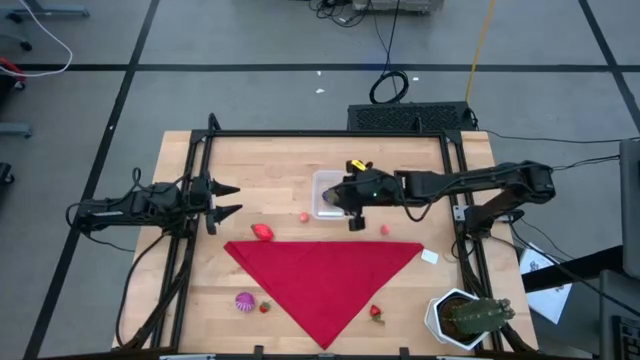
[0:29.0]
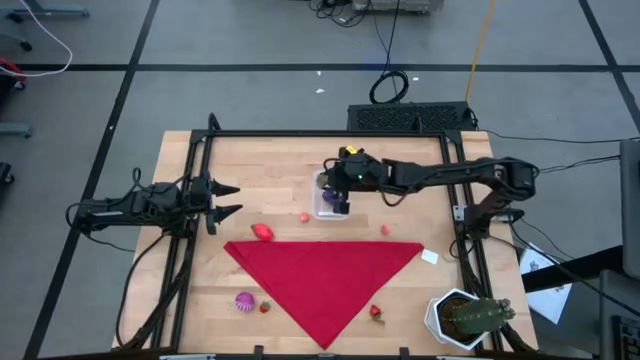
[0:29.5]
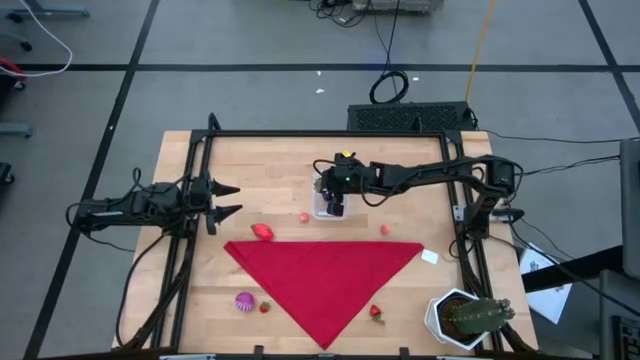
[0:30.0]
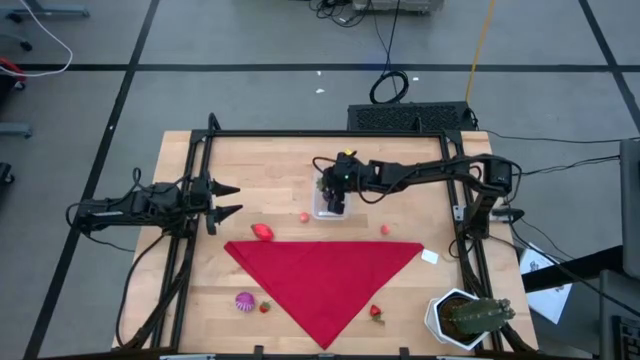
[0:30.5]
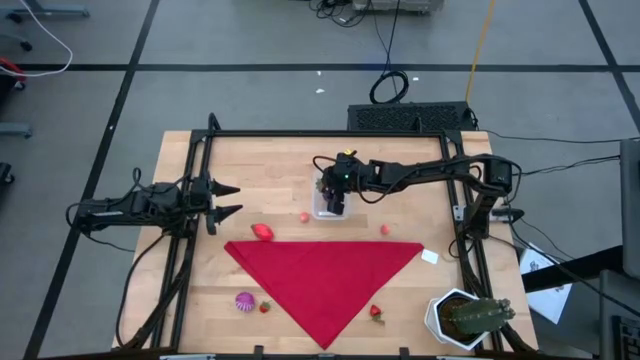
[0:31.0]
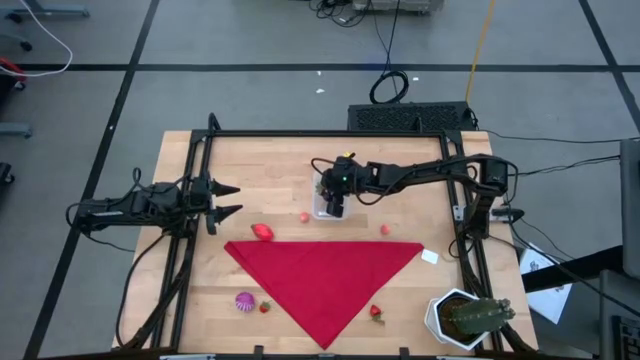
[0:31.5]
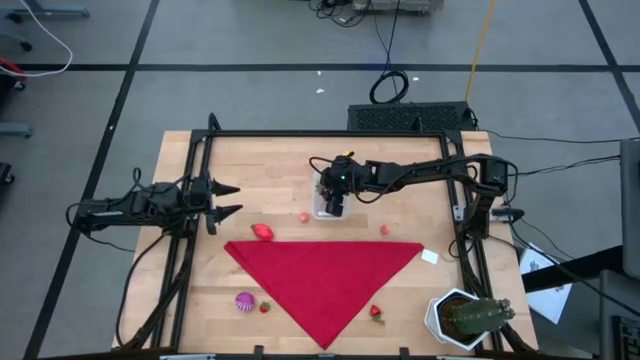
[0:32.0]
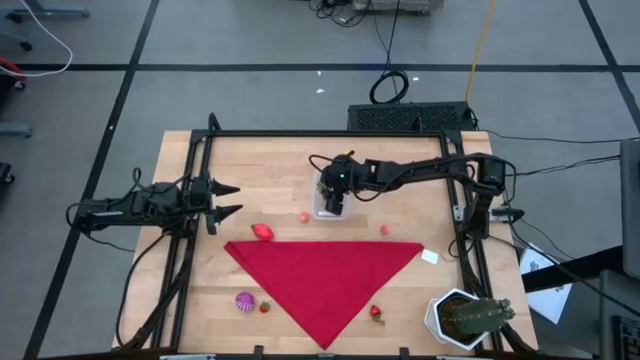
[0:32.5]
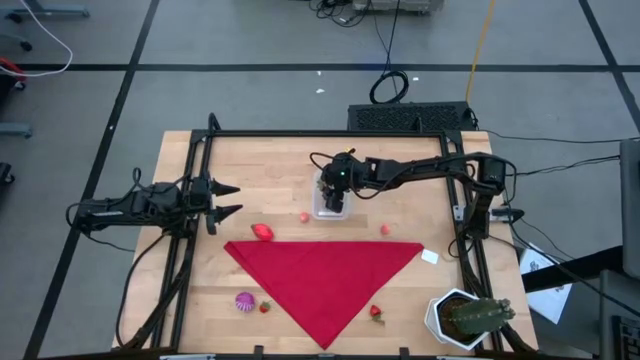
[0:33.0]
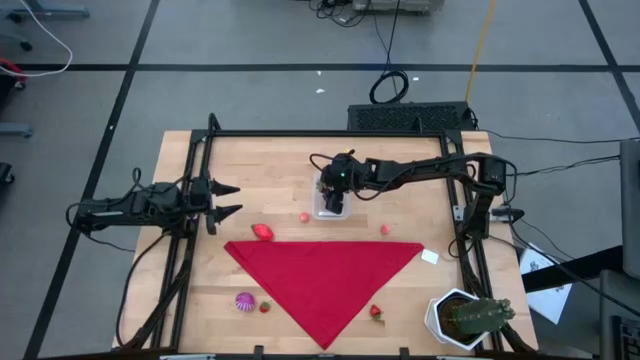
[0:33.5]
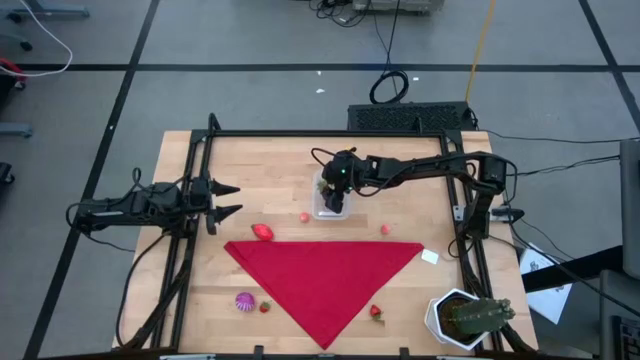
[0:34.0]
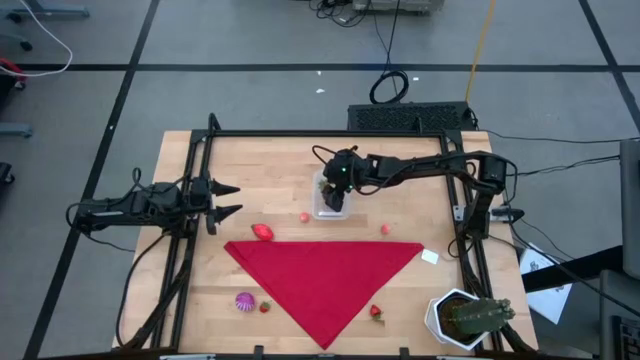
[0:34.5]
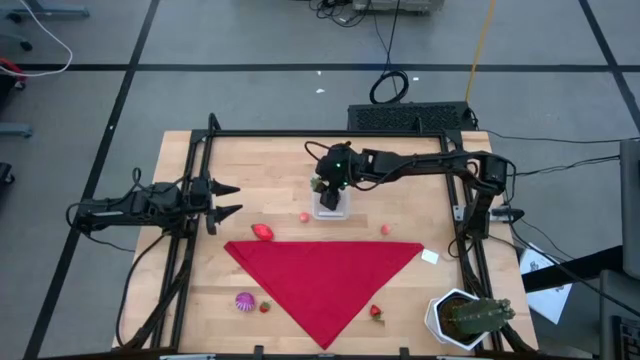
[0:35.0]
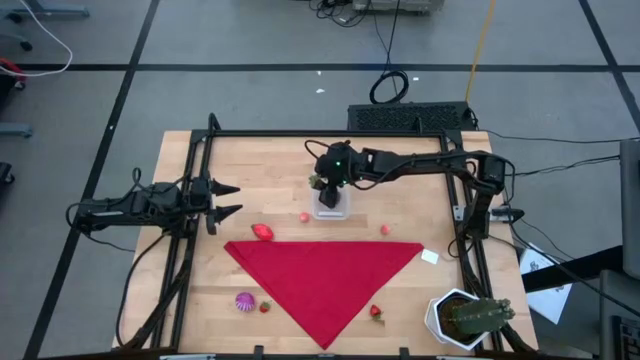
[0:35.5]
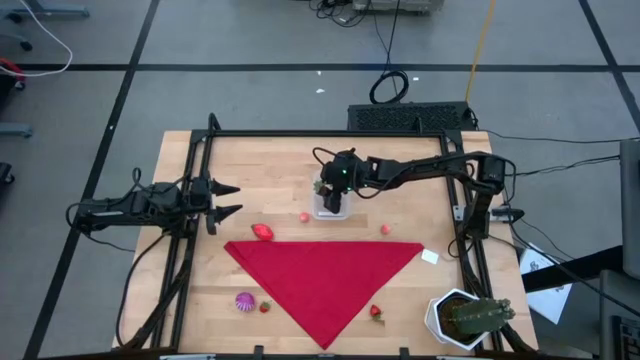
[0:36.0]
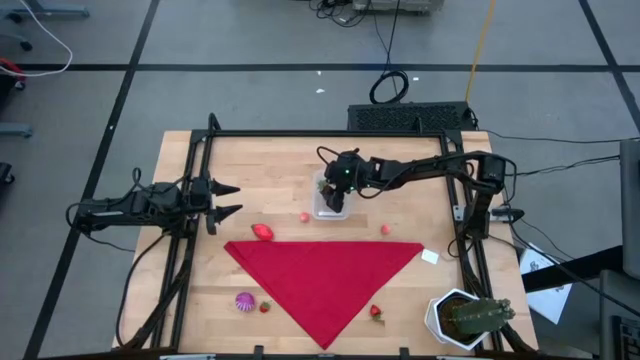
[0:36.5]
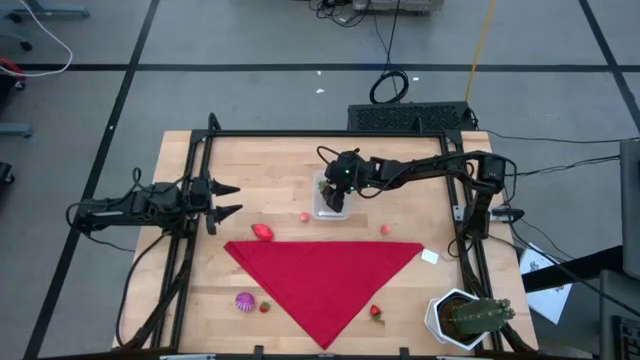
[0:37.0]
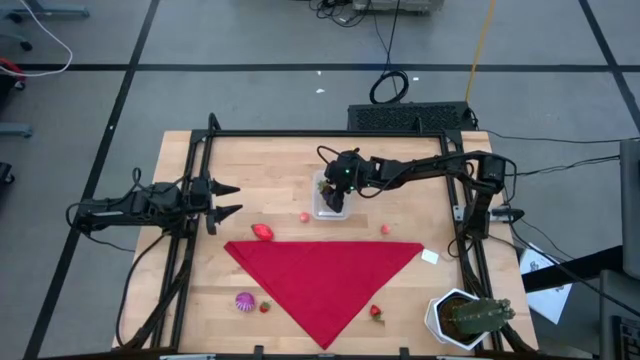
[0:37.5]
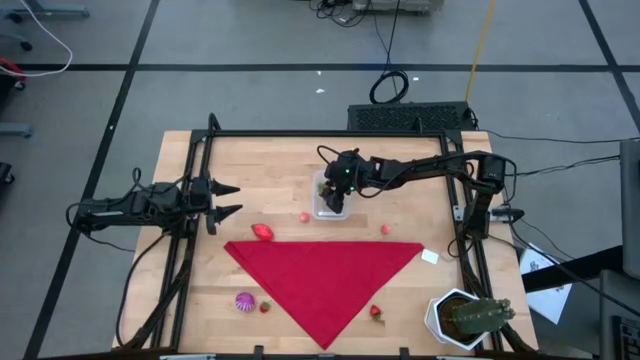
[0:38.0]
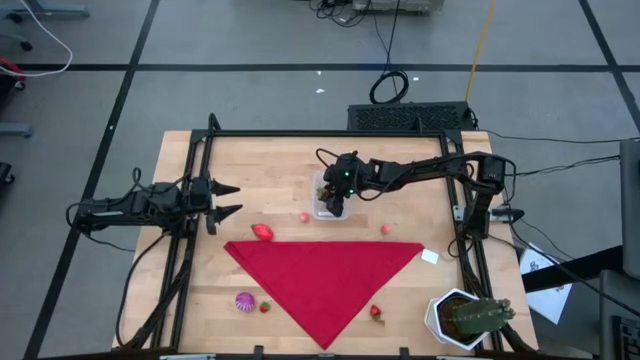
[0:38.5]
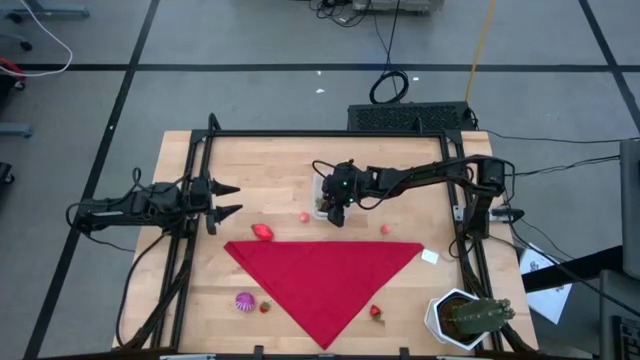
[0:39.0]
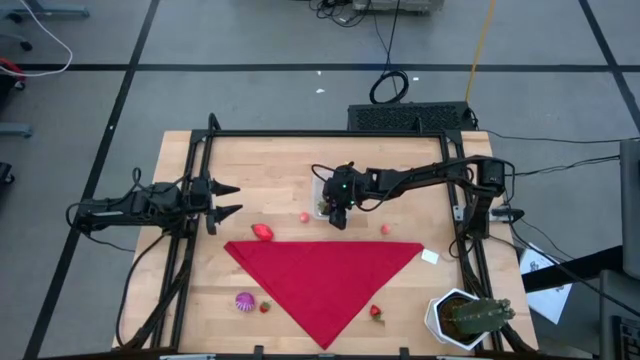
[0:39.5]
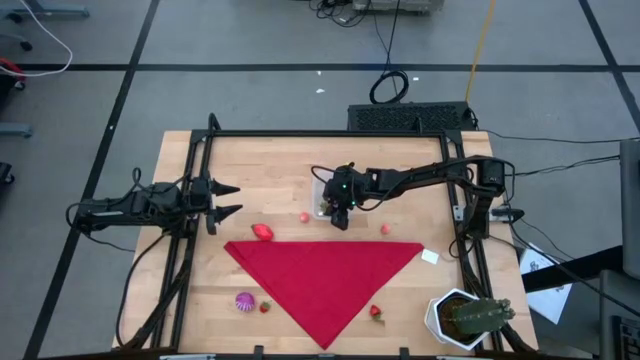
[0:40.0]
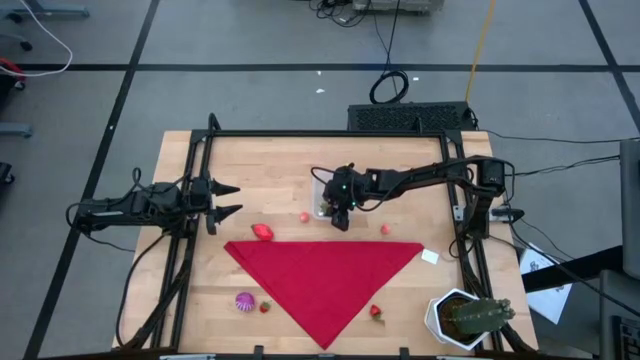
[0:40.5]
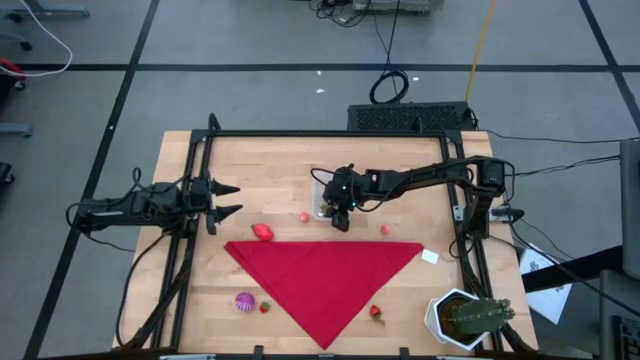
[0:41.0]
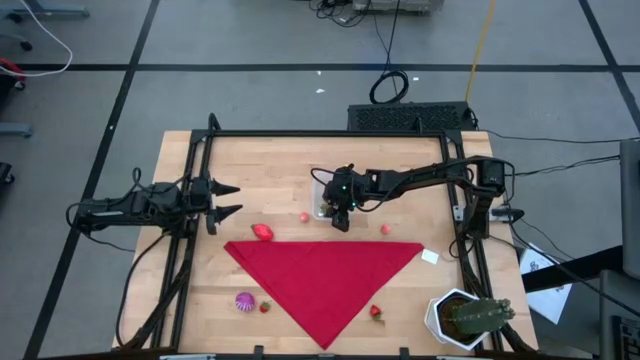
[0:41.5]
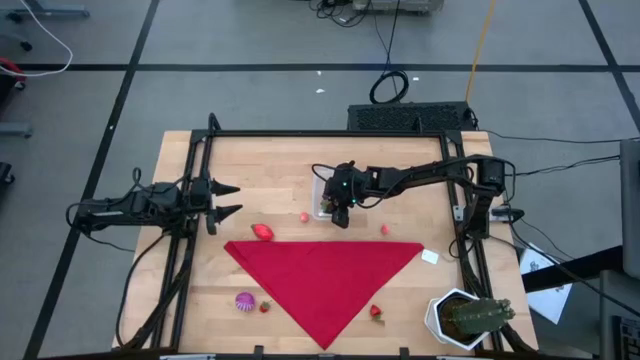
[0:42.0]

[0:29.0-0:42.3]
Task: Pick and placing Produce into tupperware
Put the top right red strawberry into the transparent bin

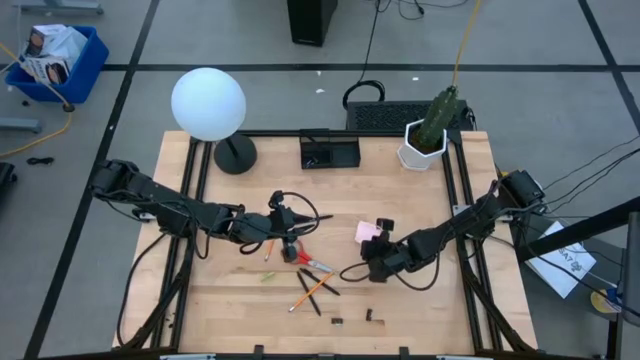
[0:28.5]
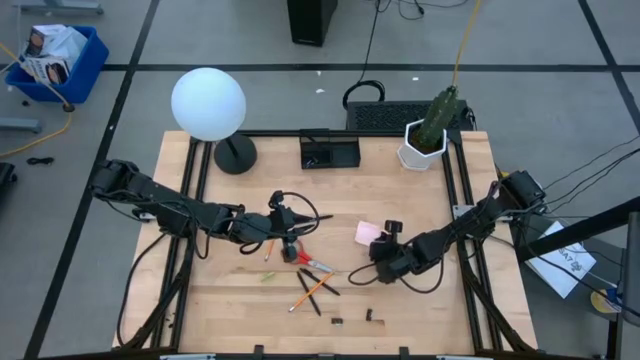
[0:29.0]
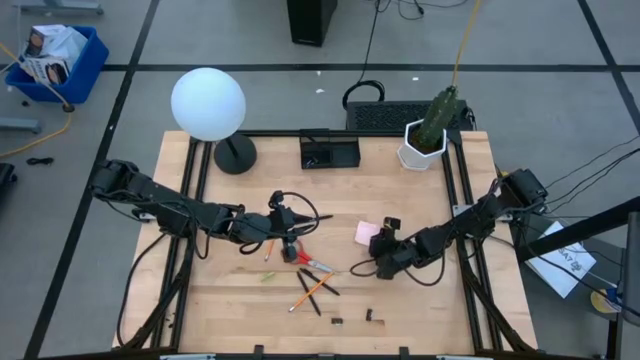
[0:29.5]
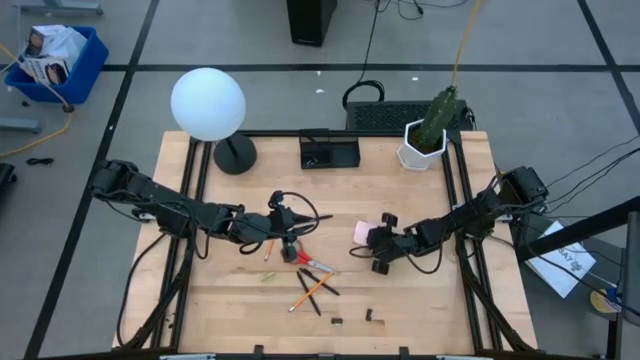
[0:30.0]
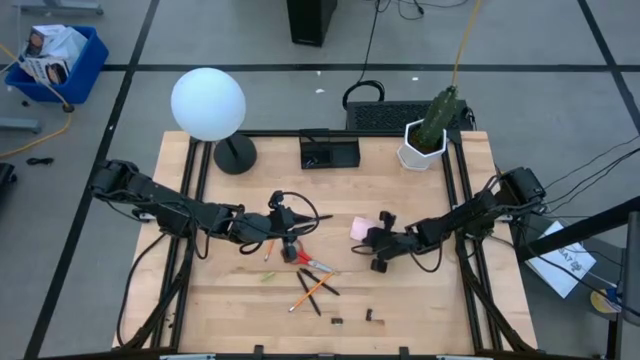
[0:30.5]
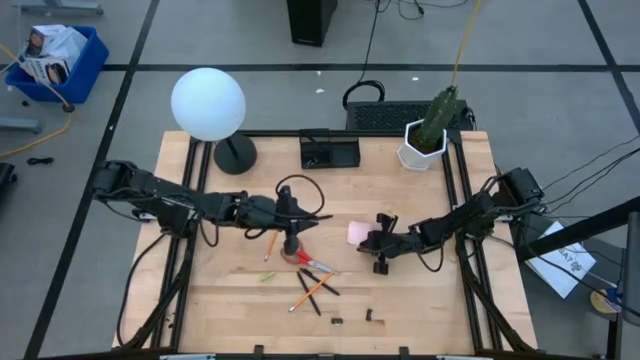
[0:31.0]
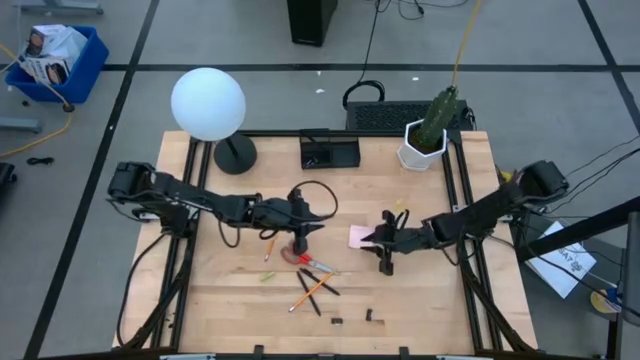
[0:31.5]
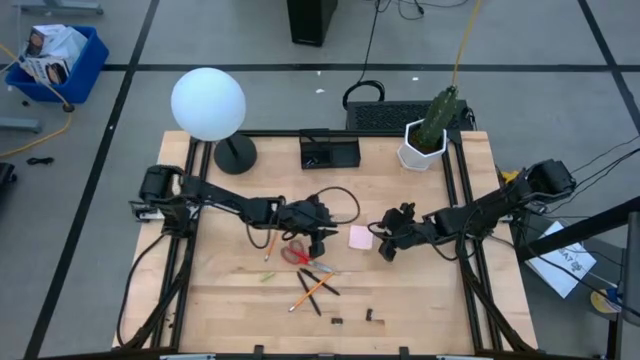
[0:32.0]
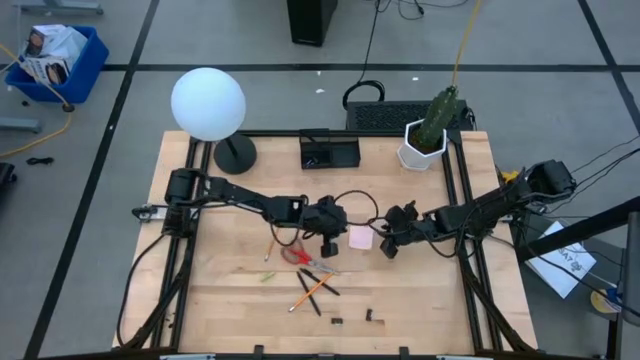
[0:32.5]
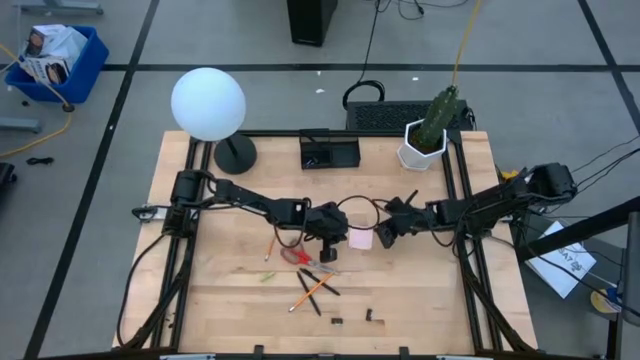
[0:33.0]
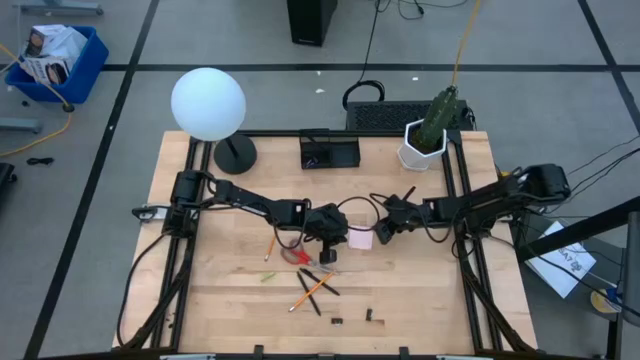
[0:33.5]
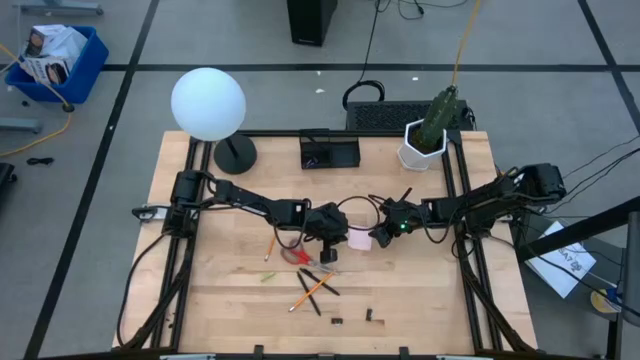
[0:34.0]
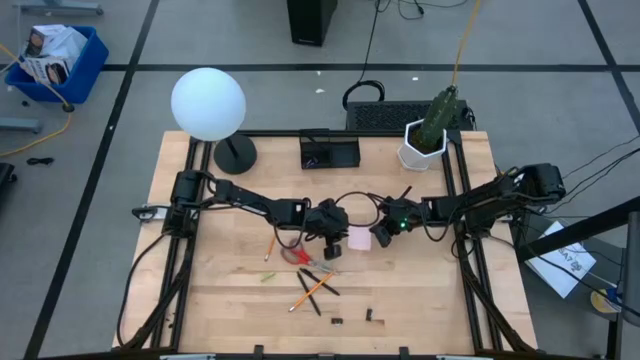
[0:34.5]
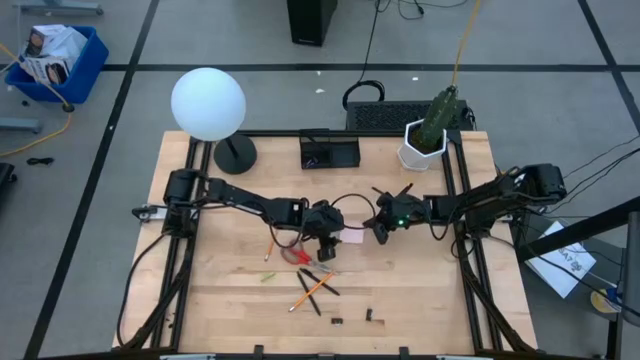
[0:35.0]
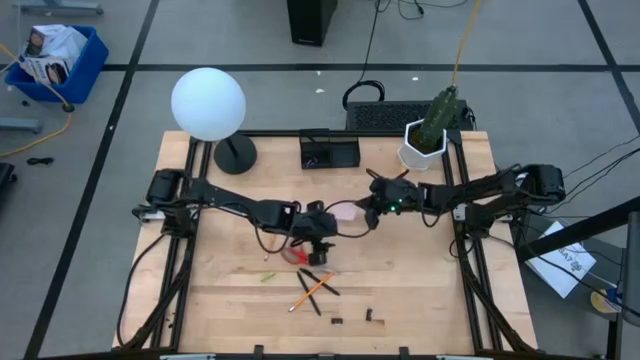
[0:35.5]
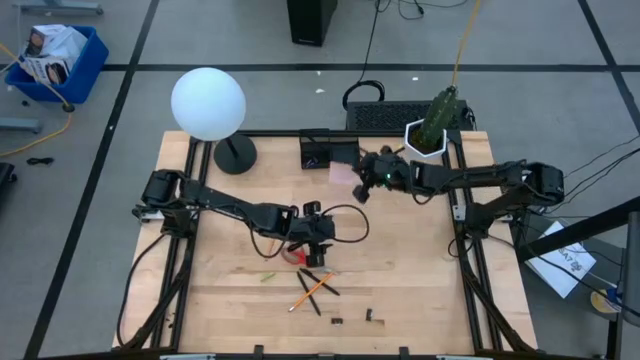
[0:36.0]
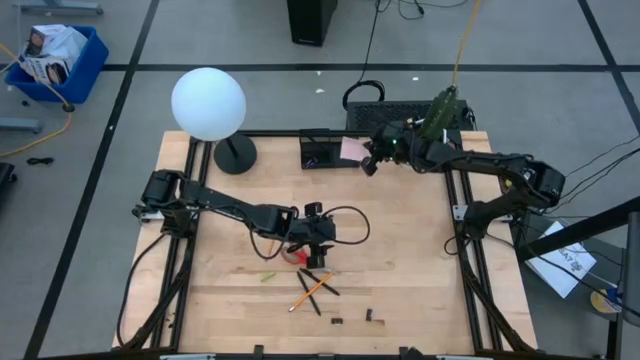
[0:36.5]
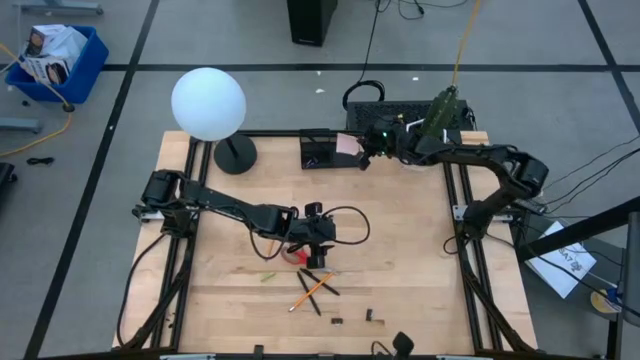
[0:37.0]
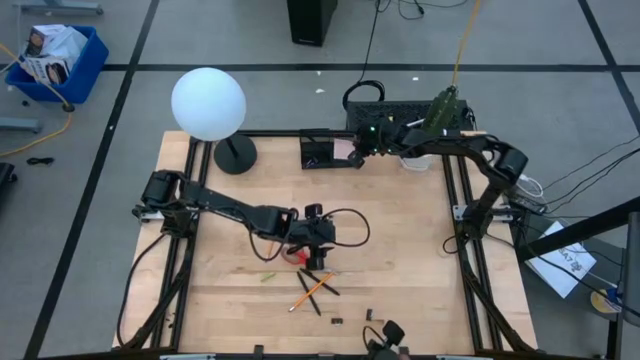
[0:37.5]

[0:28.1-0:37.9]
Task: Pick and place office supplies into organizer
Put the sticky note into the desk organizer
